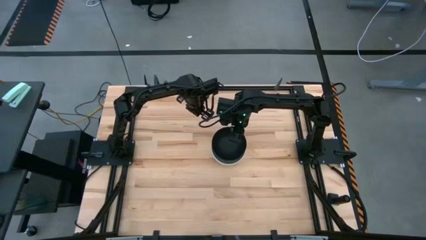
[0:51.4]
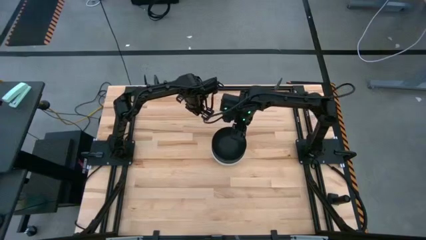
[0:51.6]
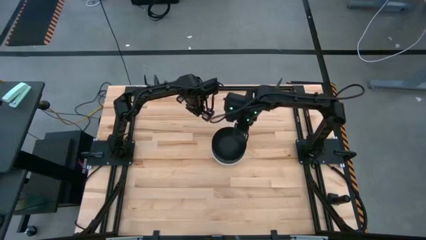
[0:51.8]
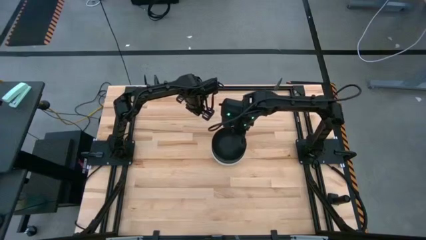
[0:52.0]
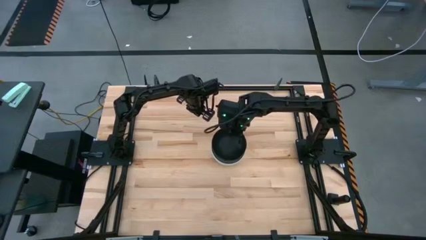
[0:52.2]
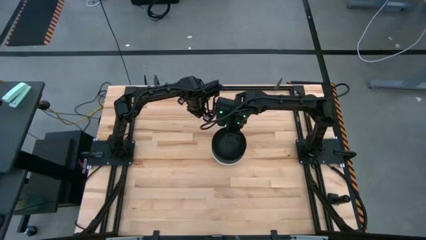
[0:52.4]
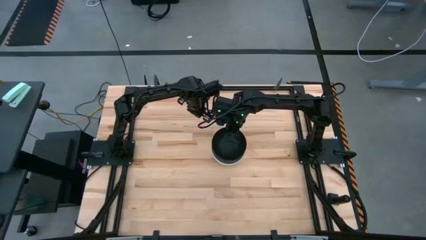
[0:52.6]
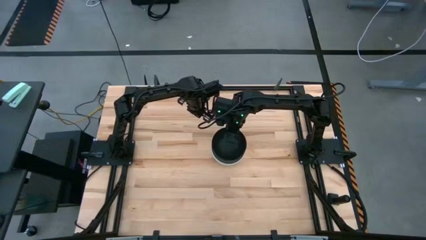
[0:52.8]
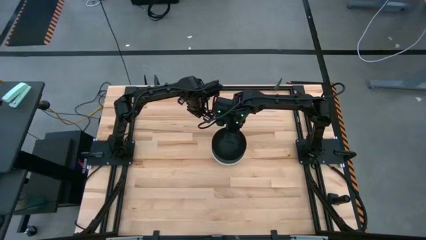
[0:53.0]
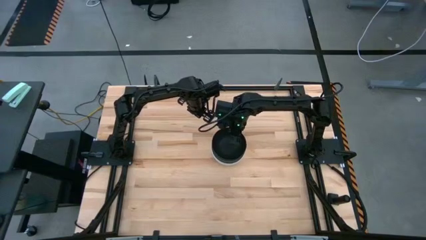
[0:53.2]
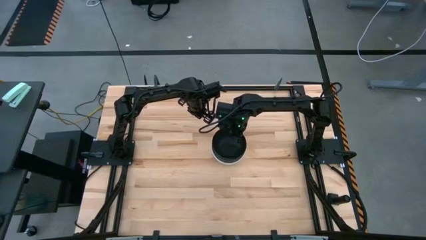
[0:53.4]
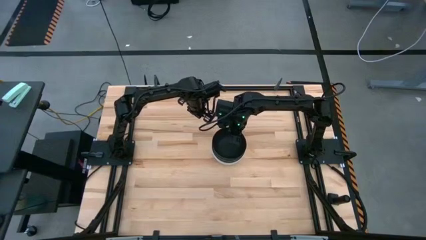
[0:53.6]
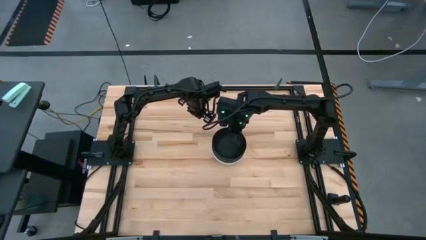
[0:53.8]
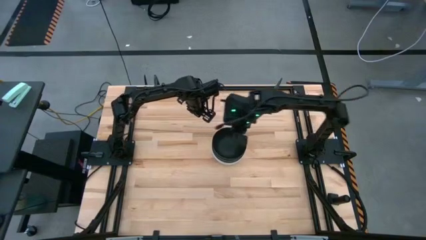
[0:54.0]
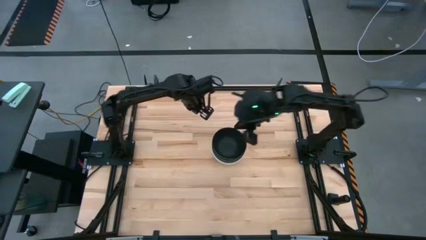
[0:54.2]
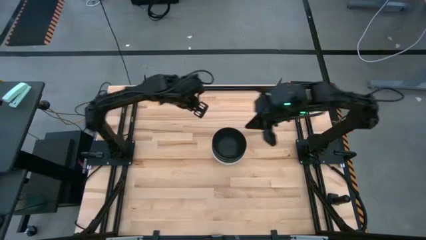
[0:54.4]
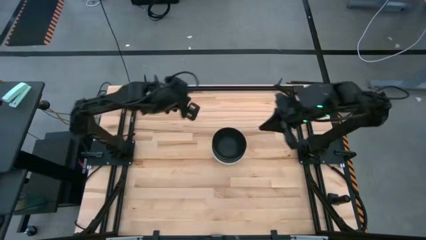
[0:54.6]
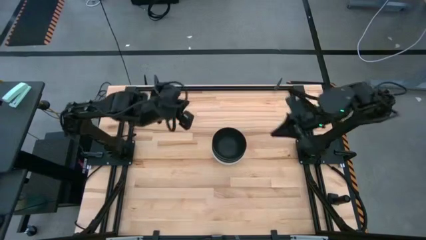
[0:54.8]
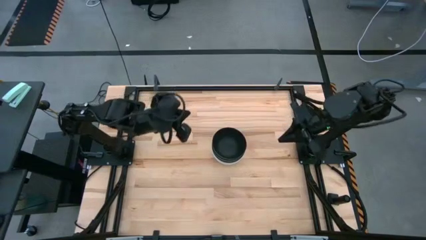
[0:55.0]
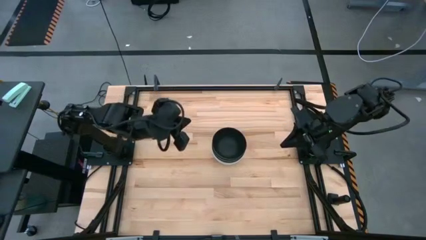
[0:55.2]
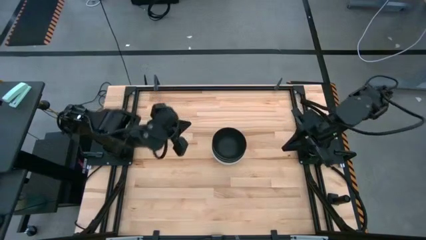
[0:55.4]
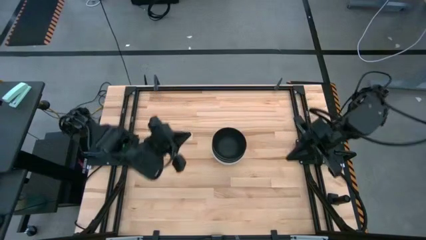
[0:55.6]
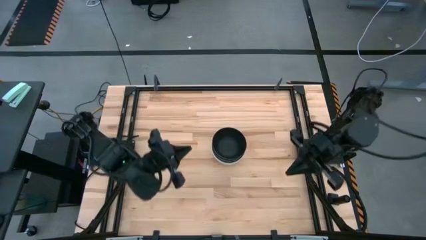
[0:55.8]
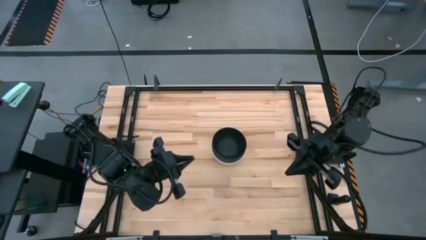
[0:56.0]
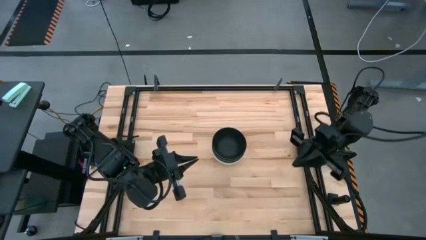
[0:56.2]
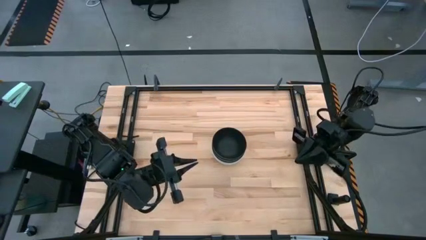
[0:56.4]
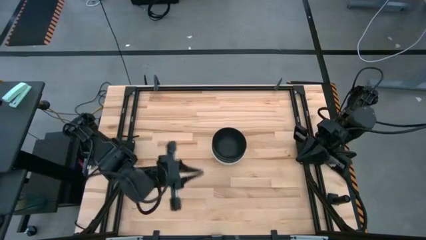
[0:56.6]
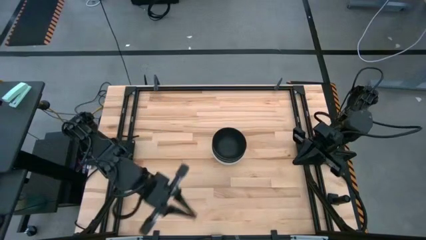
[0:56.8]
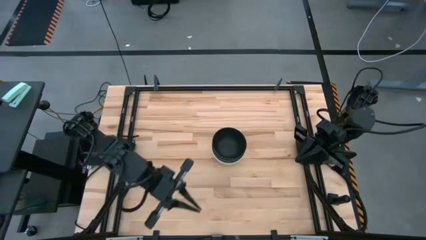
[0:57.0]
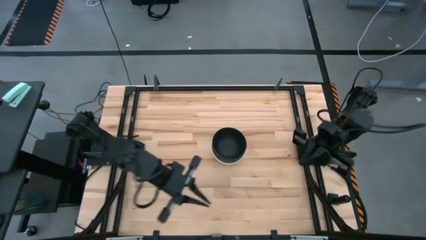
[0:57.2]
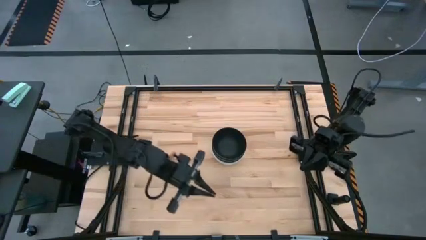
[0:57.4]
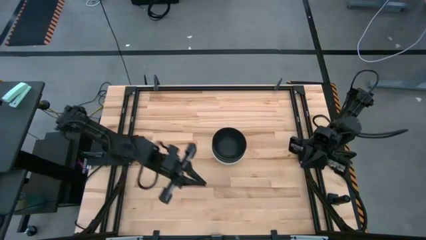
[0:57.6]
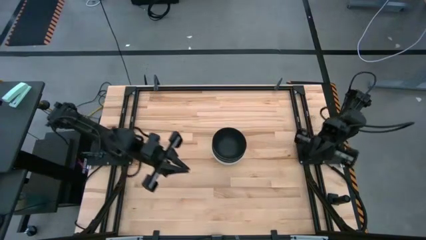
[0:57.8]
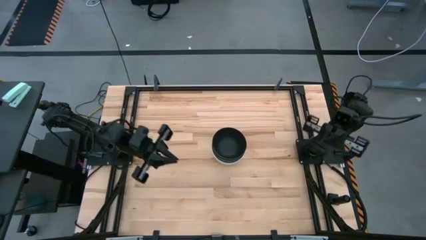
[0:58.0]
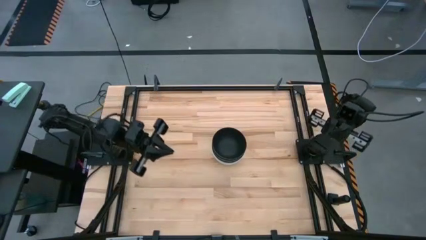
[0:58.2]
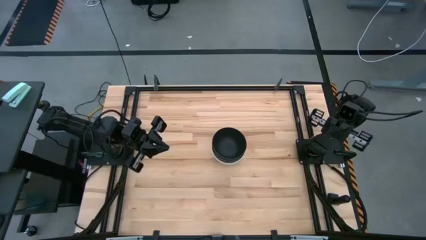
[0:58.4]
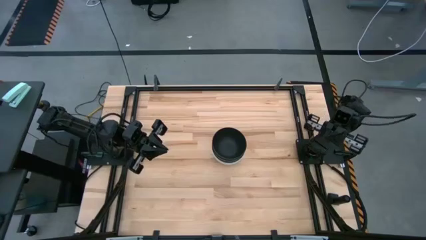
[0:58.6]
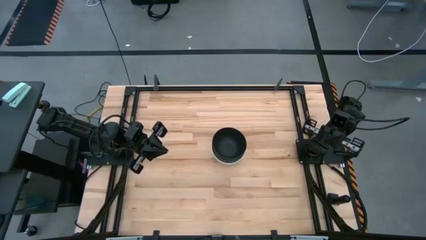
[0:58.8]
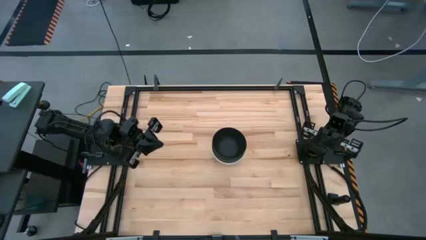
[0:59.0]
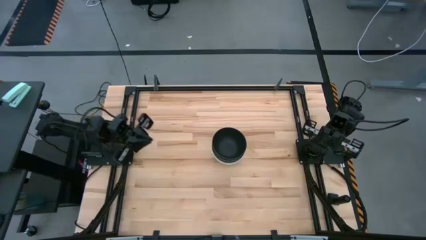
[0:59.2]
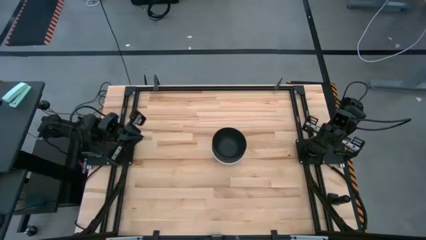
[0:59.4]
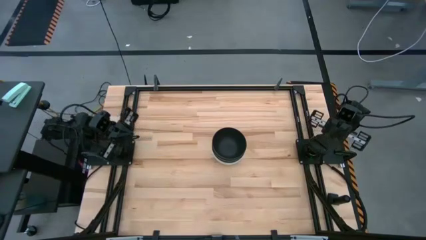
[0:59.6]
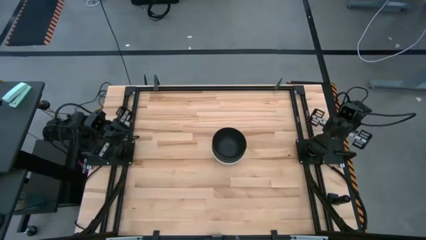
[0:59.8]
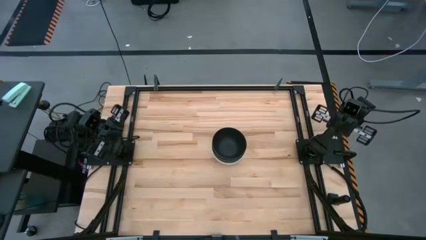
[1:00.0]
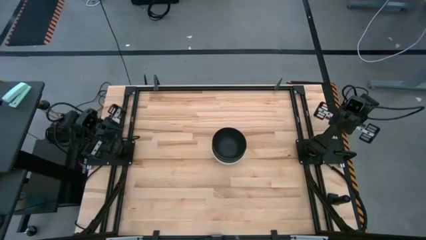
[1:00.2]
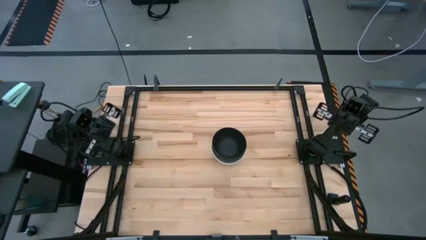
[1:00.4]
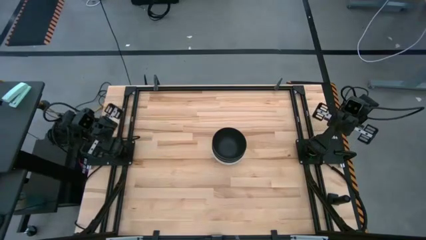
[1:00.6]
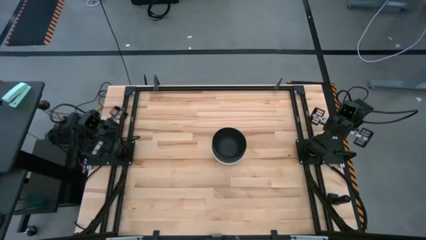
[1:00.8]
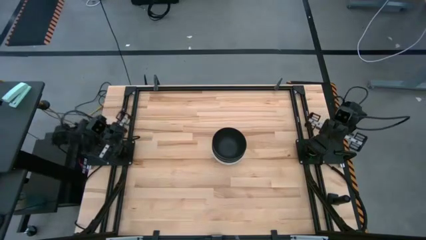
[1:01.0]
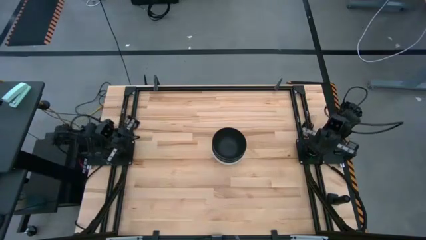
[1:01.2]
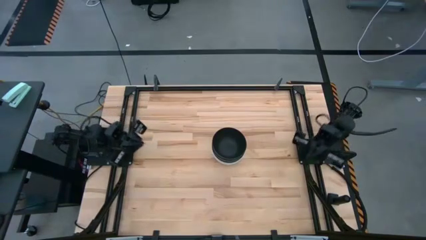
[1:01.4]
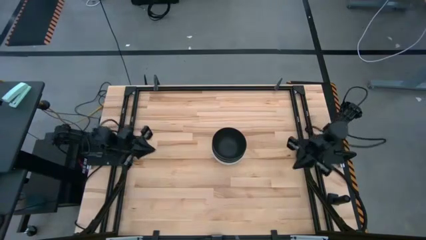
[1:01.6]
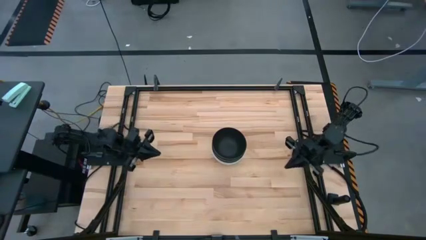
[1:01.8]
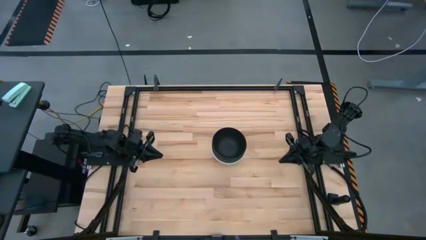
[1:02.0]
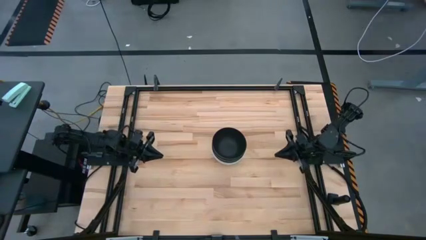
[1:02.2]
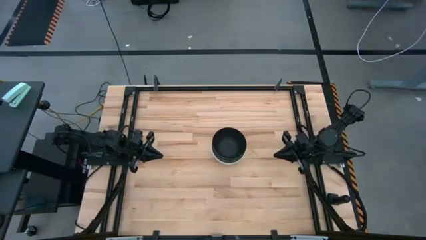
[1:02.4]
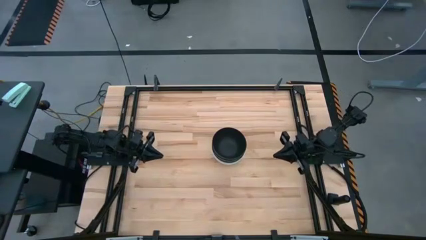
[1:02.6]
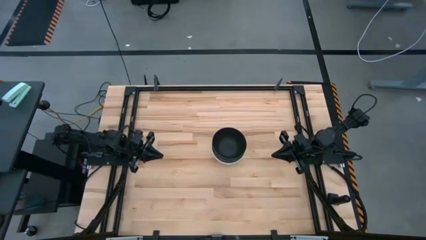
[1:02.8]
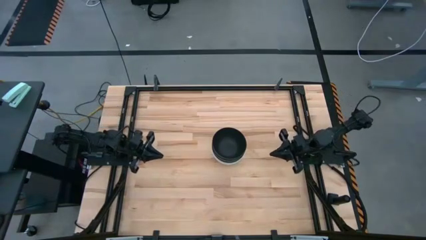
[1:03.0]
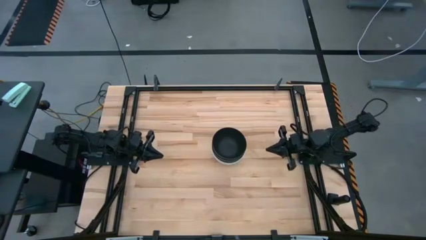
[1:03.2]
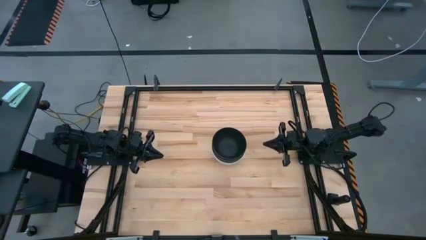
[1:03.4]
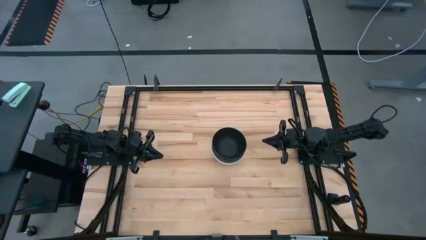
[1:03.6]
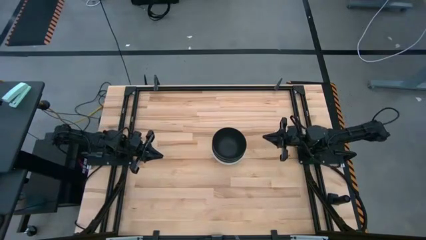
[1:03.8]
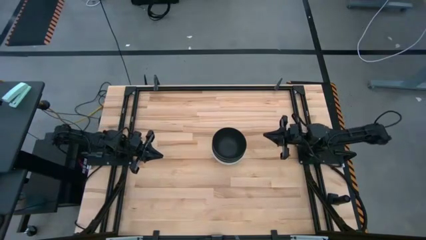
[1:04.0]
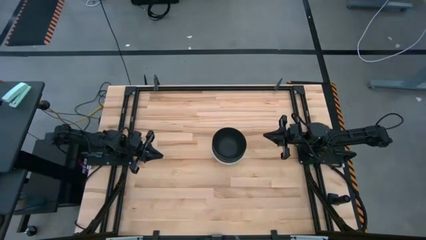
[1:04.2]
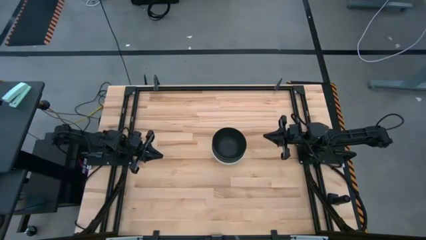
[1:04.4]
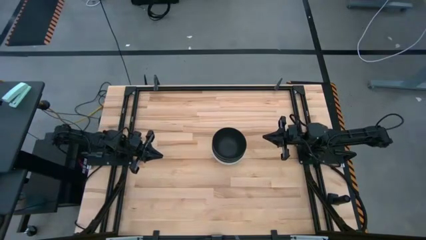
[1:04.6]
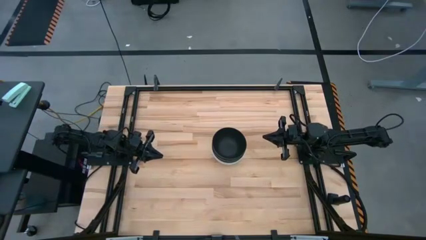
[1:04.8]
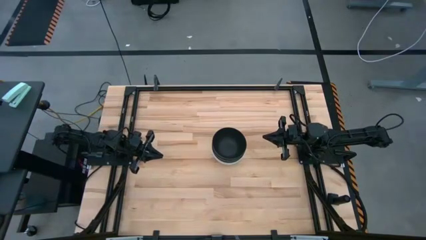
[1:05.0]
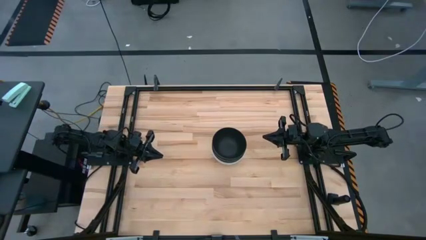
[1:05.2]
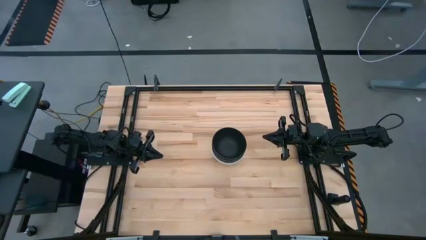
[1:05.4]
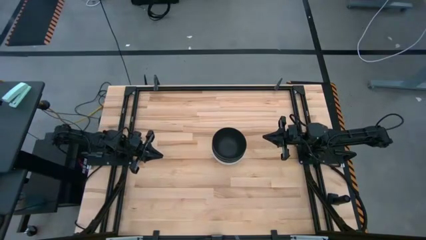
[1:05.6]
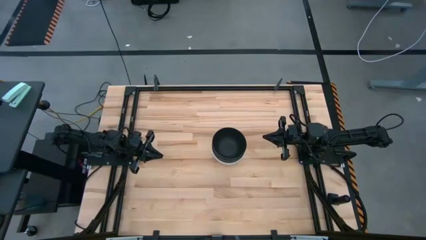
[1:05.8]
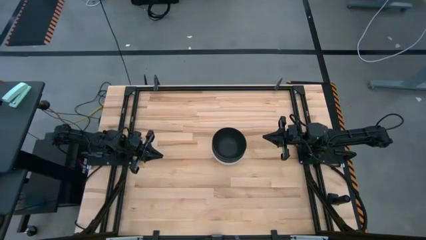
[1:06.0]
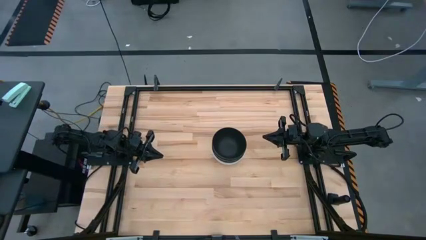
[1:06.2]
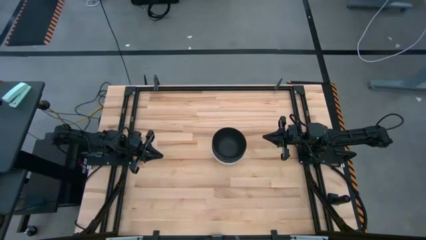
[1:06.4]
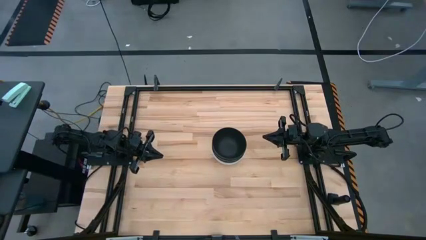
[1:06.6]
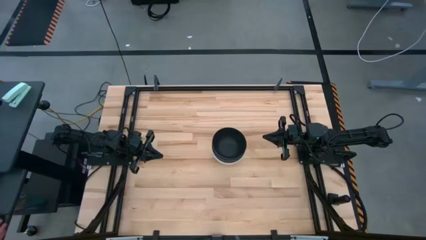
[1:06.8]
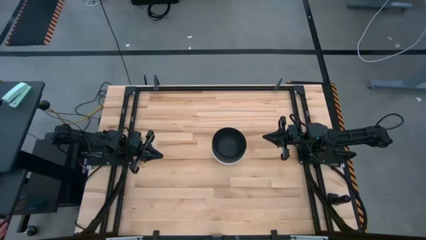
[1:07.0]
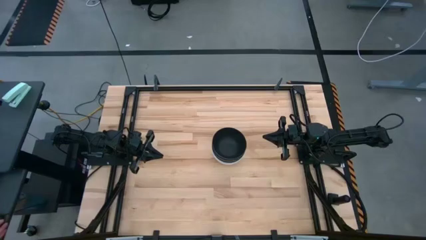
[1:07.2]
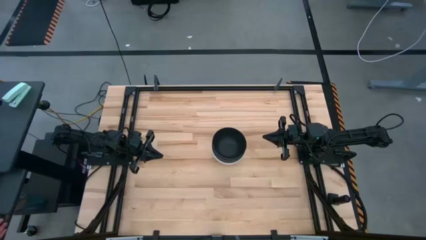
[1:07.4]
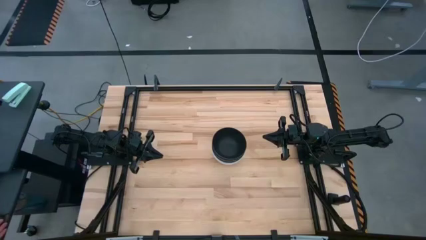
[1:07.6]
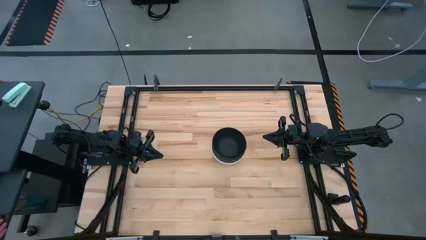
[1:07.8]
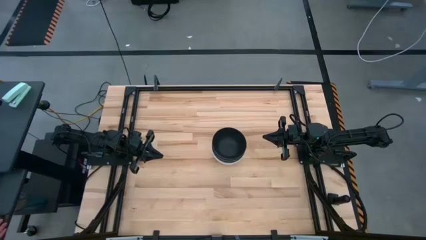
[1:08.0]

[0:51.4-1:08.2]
Task: Nest bowls inside each other
Return to Home Position

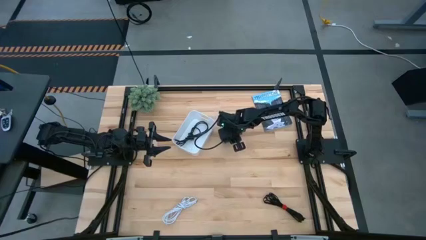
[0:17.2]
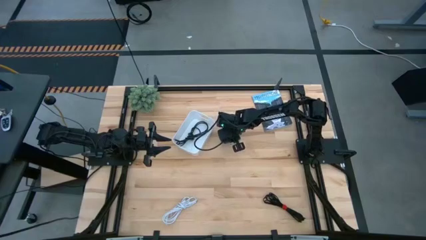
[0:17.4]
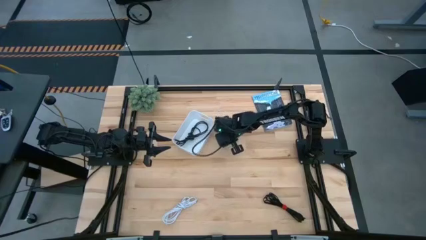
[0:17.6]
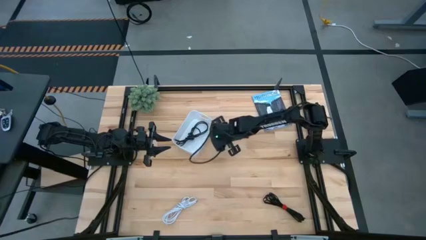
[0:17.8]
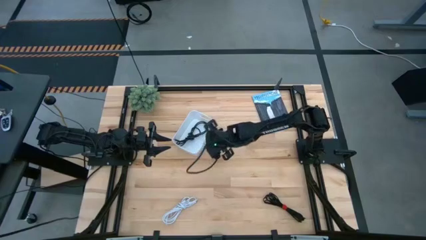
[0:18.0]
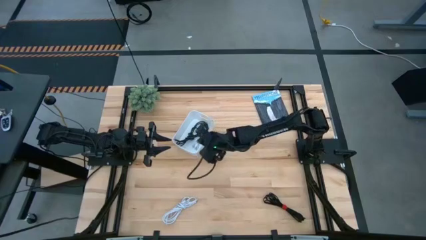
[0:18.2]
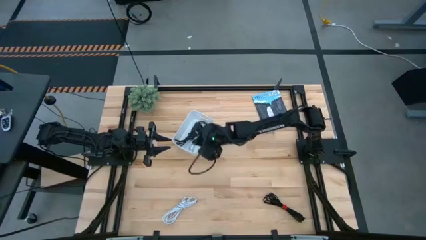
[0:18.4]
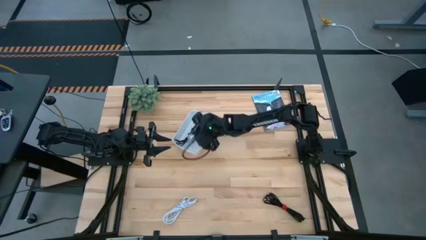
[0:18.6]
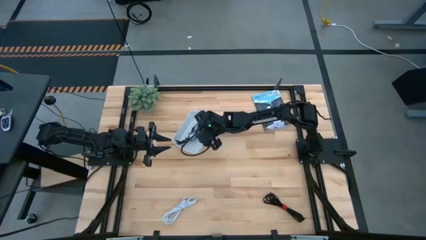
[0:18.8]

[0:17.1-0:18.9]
Task: Pick and place USB-C Cables
Put the light blue charger cable into the white bin
